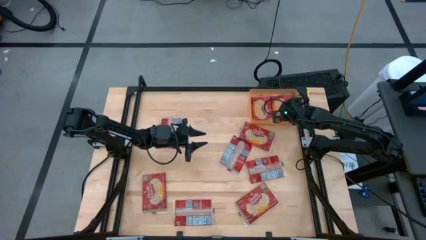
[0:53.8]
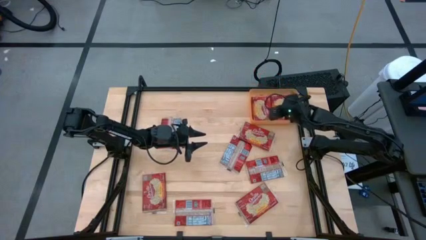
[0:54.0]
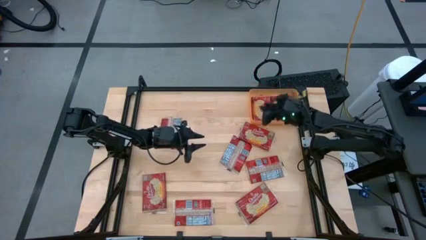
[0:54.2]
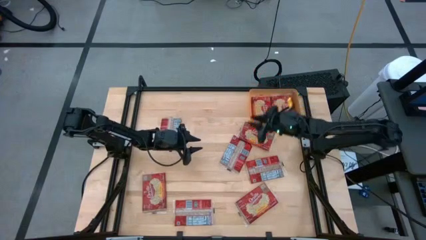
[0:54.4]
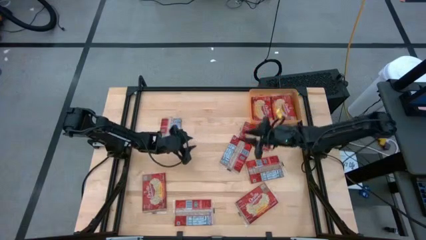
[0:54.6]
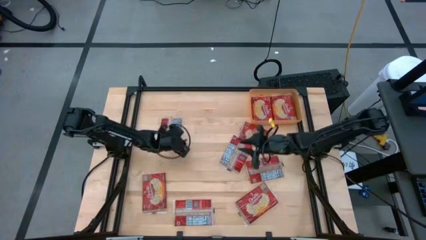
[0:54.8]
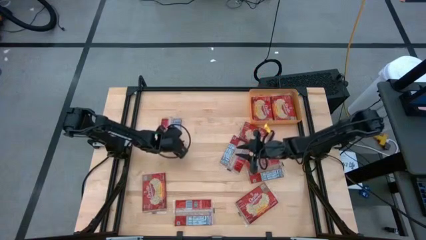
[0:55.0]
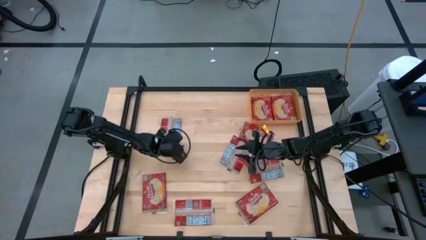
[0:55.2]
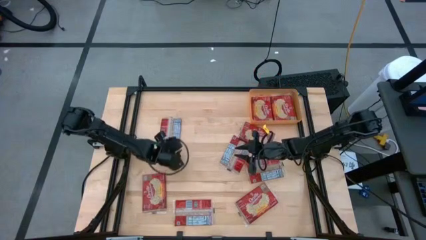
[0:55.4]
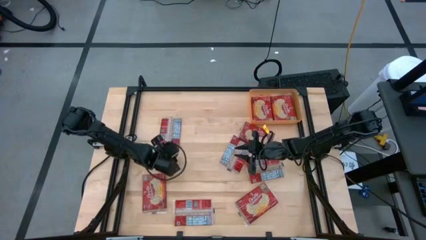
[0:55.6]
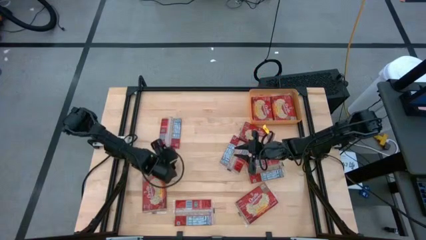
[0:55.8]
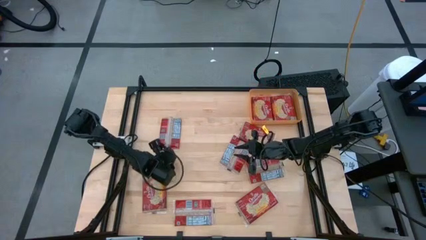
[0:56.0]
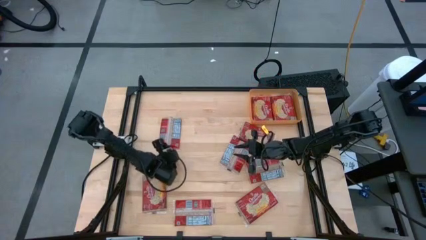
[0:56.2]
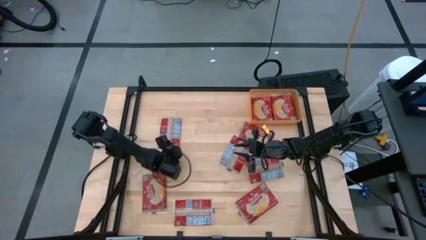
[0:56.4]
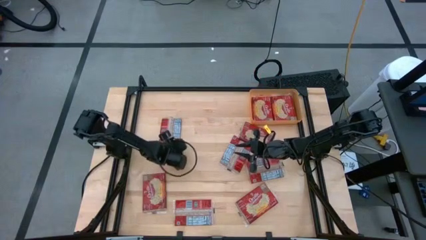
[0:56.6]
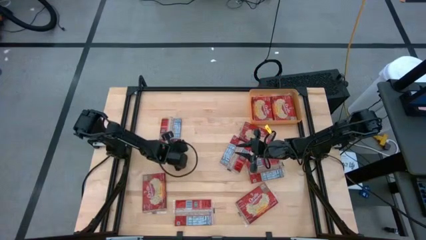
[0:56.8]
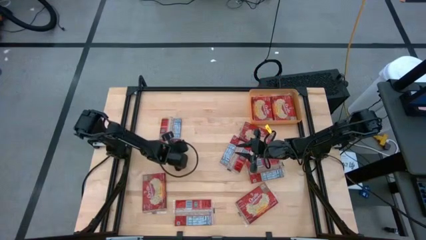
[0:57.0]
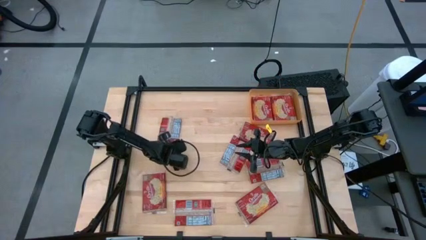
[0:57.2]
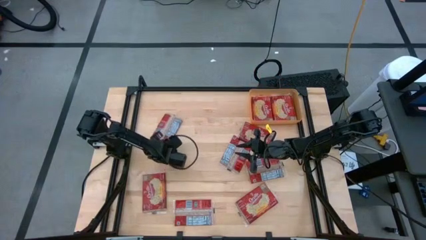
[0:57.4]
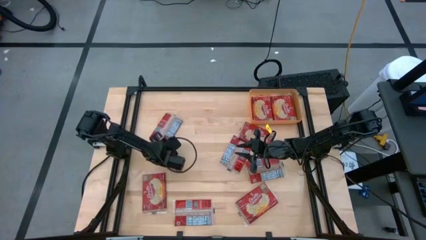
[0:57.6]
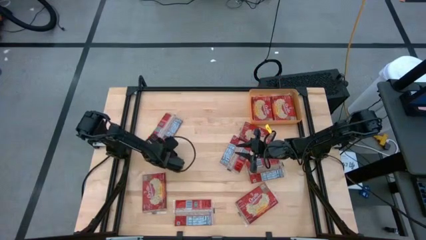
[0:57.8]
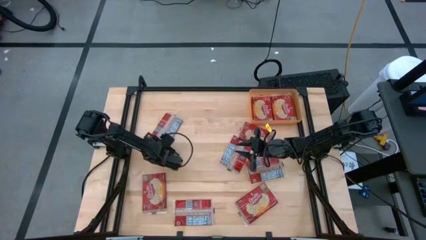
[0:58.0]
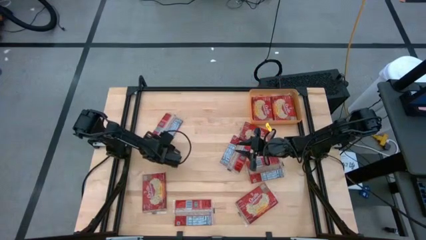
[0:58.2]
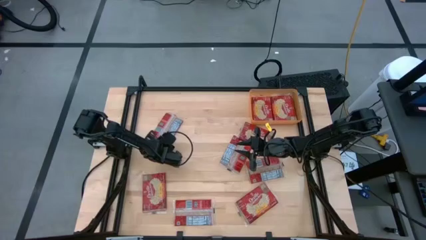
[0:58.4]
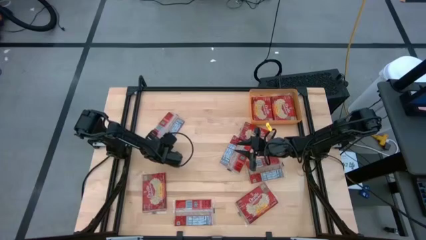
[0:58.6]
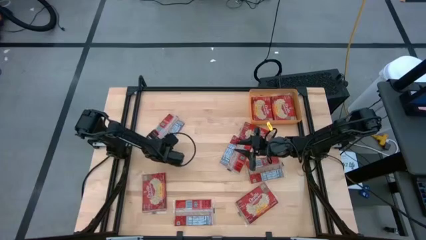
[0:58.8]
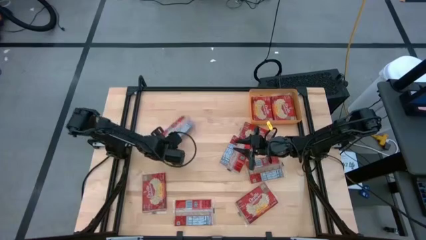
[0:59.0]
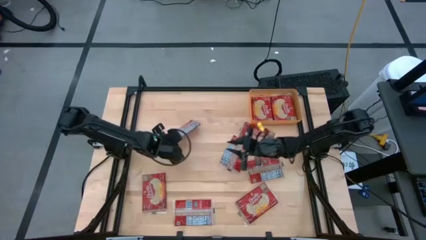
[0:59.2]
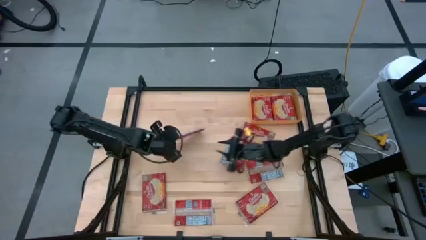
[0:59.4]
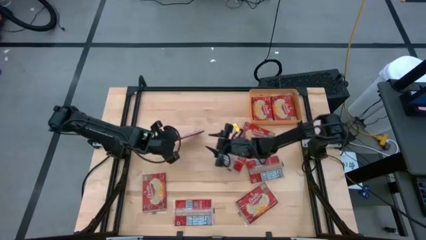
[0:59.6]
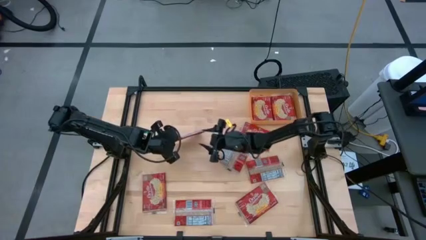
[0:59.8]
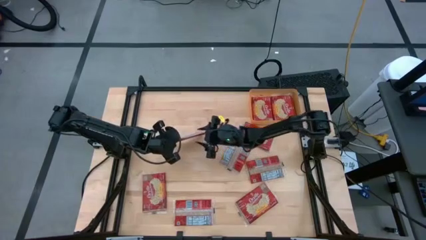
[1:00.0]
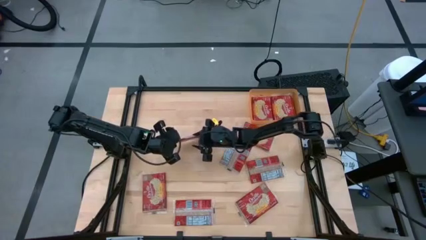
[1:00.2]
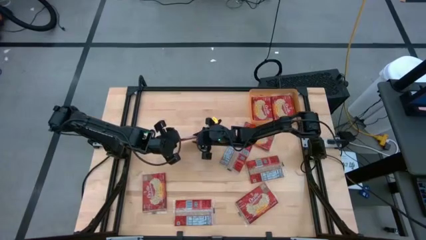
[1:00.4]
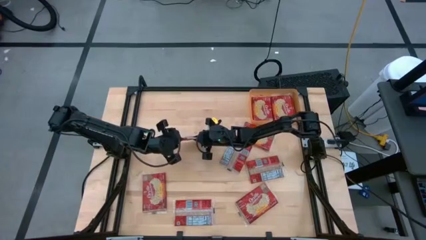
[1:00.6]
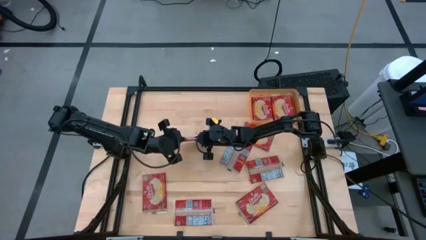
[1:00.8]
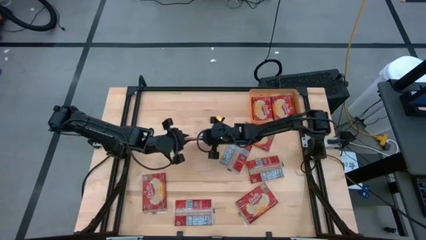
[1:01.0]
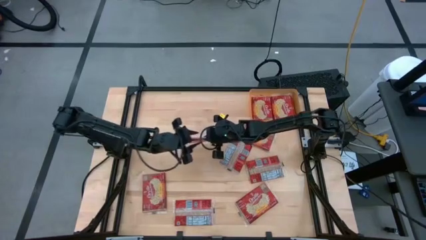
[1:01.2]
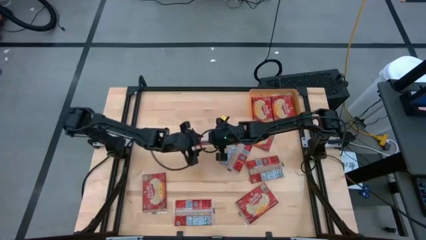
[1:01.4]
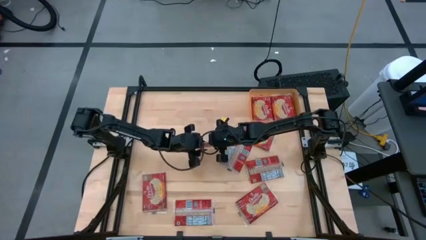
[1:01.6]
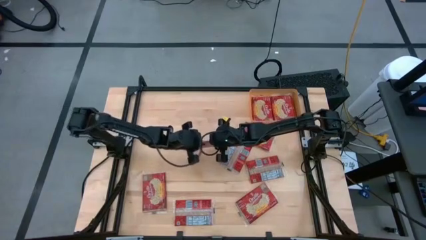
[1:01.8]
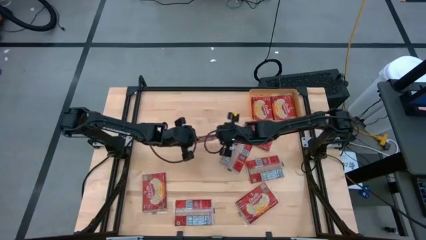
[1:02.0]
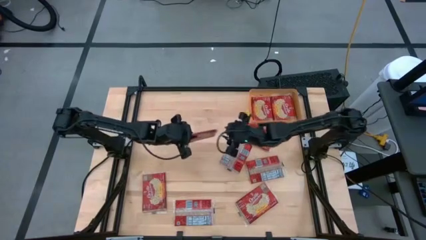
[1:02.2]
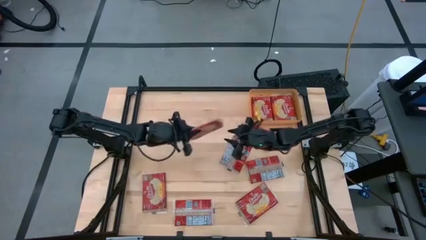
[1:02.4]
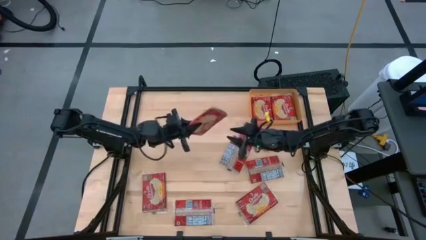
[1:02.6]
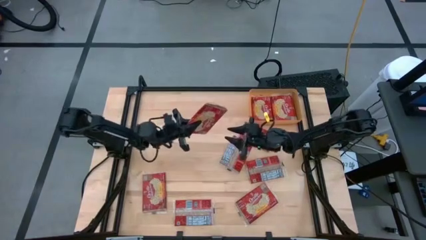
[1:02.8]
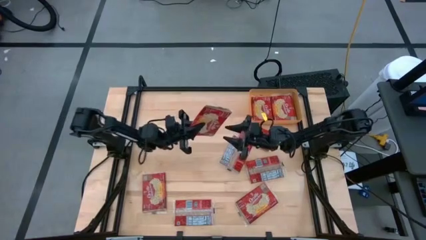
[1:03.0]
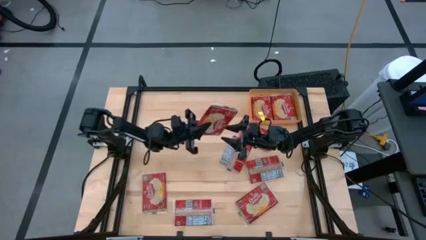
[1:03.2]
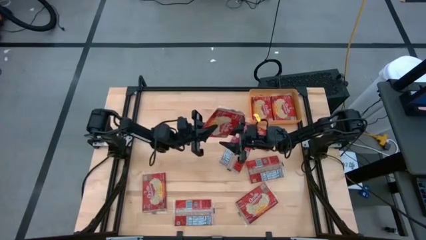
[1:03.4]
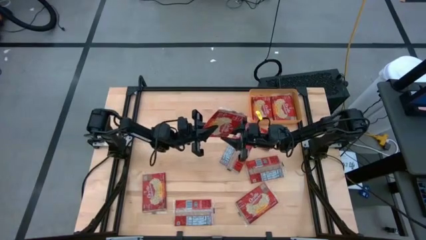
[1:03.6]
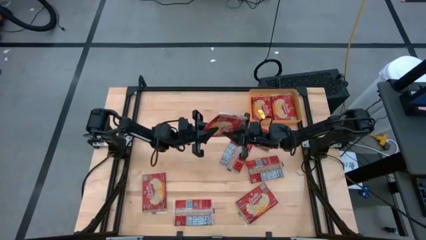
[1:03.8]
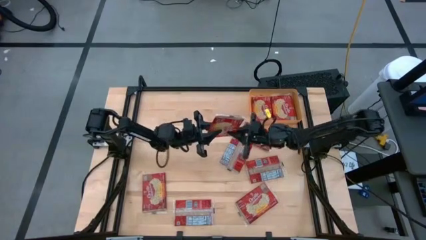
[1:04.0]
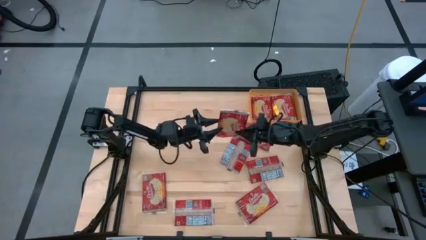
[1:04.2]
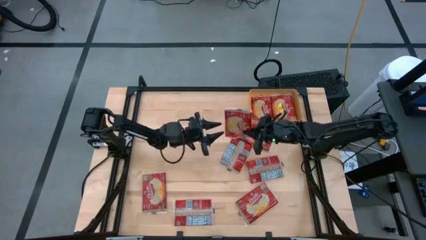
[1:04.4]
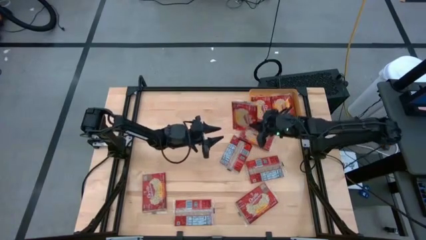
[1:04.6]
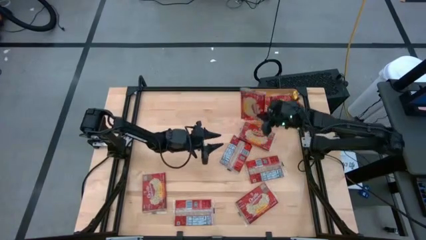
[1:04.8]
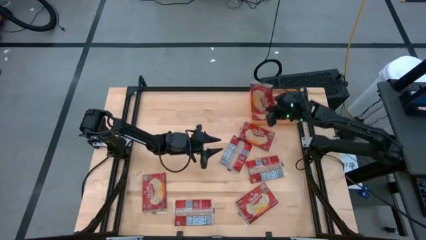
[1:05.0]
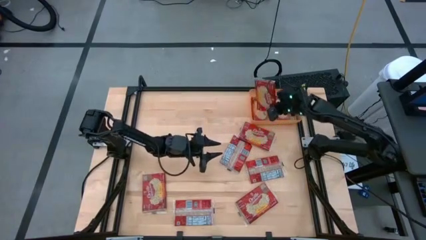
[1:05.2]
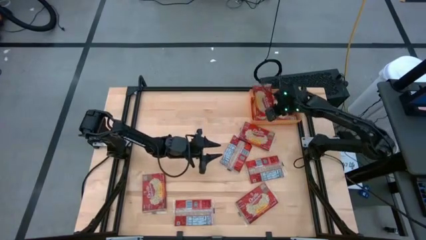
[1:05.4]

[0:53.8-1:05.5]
Task: Sort popcorn bags into baskets
Put the red popcorn bag into the orange bin

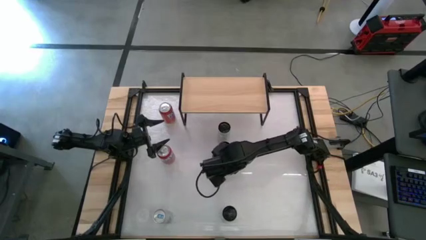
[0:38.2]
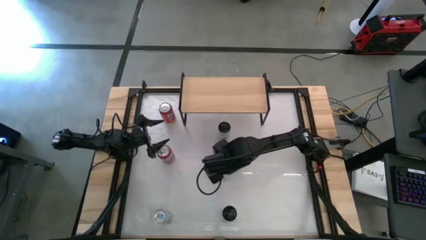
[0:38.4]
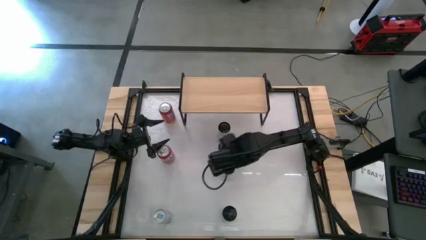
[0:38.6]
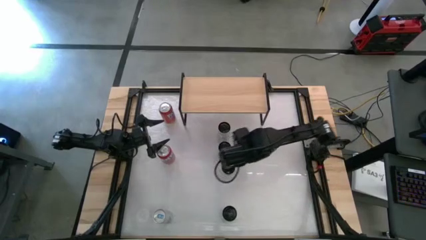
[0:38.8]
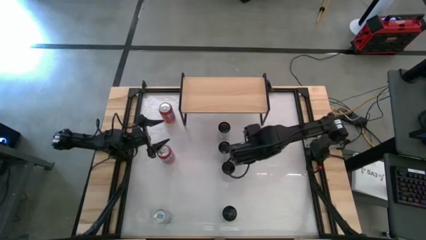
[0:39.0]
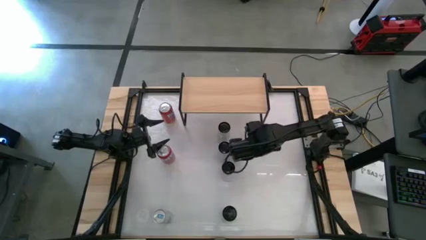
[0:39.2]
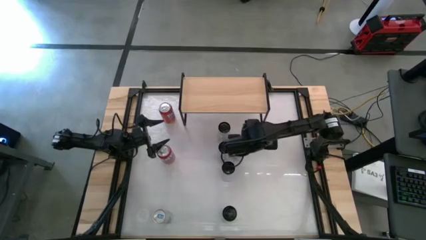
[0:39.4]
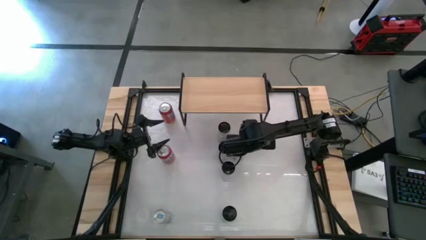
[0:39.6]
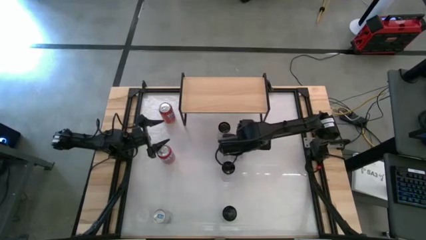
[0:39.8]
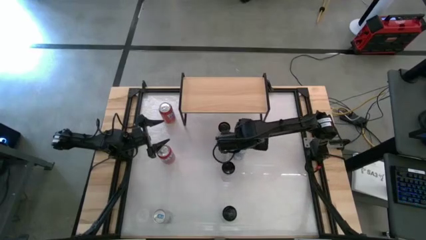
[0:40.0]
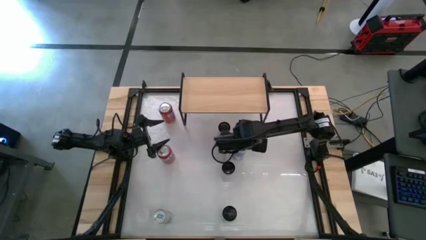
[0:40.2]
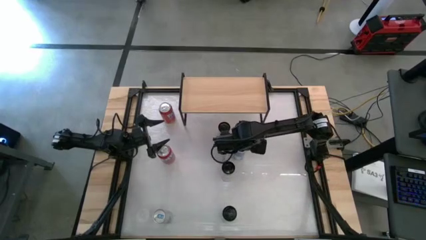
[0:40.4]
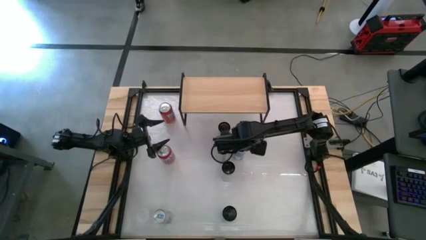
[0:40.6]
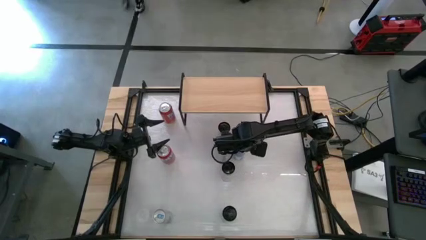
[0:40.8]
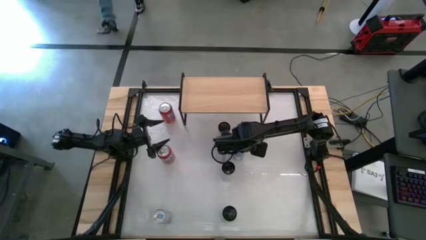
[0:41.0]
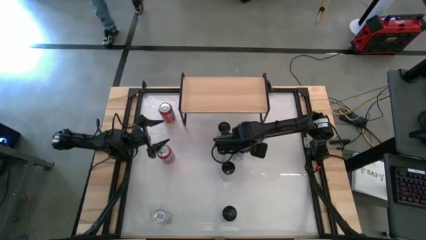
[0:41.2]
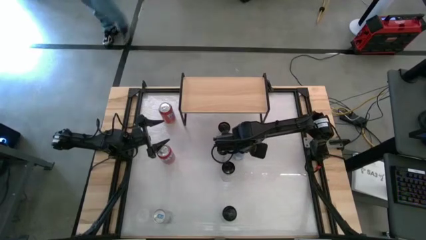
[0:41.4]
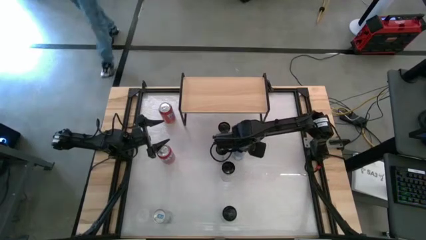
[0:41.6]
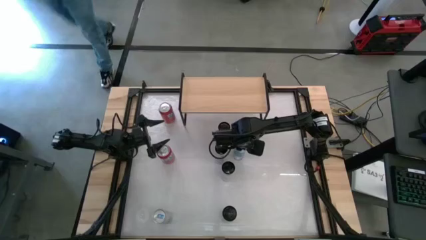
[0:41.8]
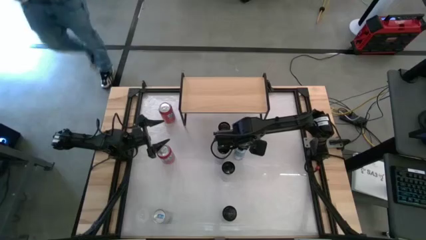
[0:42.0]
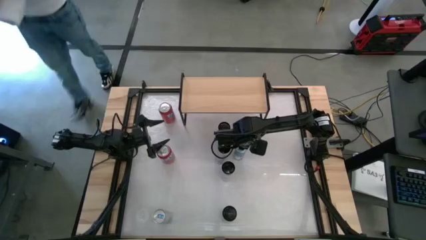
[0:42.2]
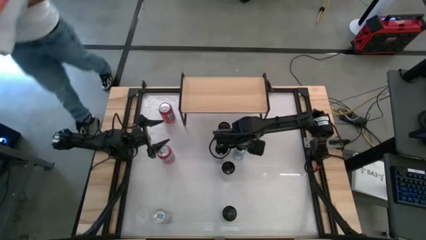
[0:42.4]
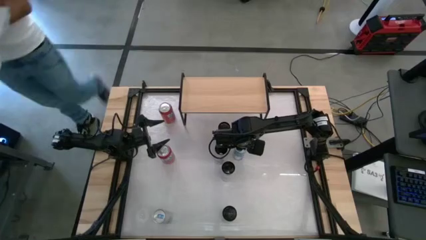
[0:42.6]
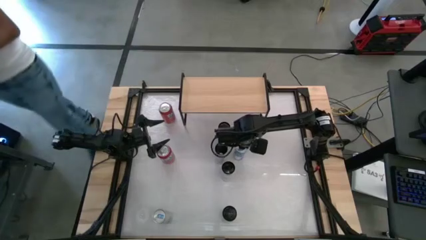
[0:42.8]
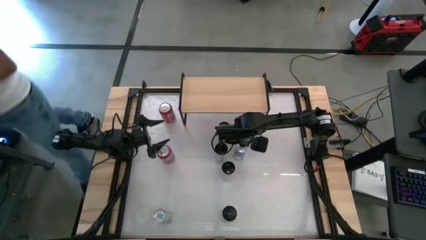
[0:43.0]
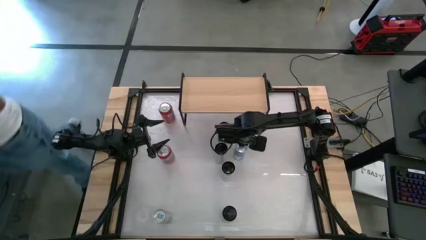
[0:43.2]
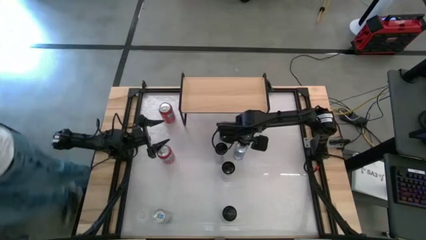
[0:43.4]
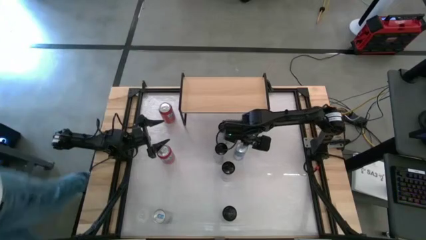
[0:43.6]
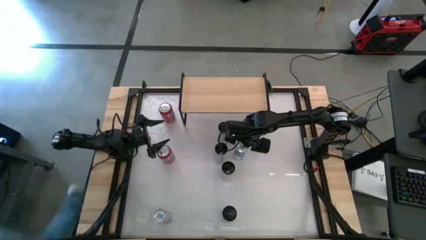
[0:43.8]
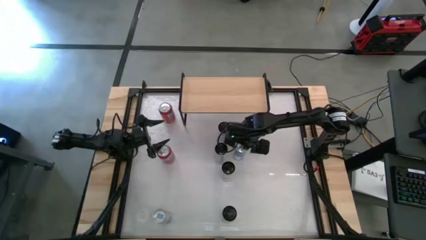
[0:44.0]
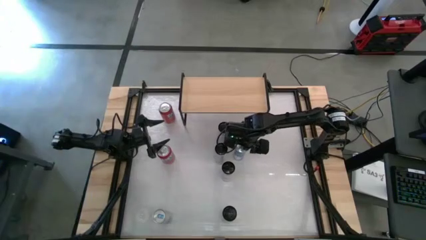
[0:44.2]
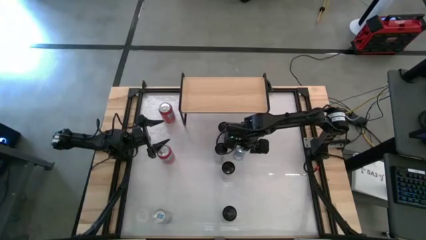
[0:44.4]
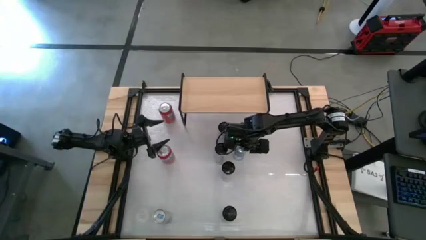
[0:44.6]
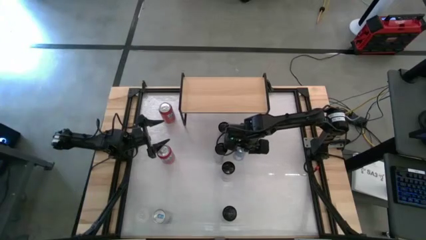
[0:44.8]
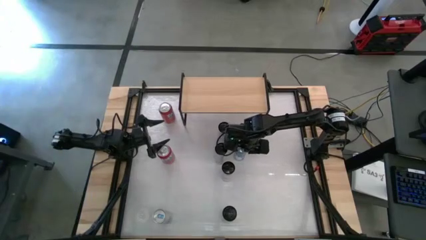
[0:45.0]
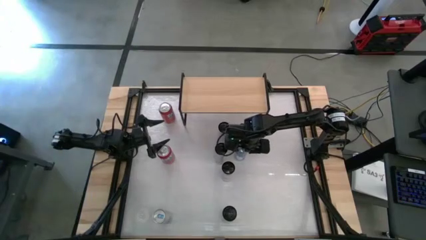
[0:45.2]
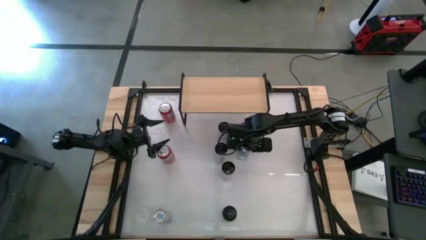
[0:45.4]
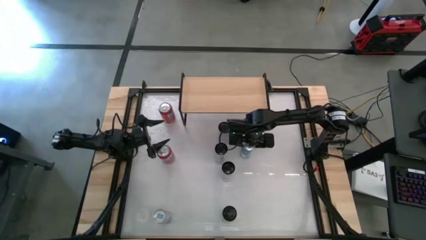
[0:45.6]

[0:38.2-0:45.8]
Task: Place canned beverage on shelf
Put the top blue soda can on the shelf
